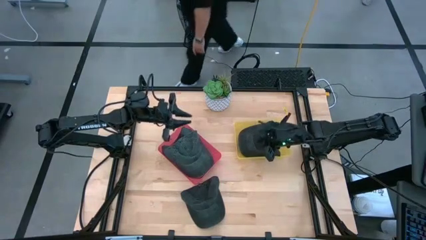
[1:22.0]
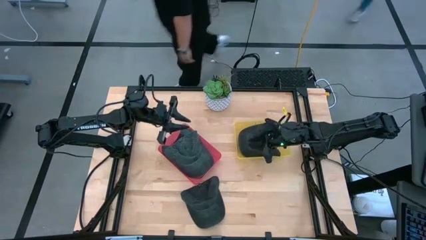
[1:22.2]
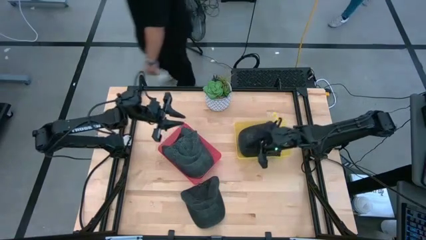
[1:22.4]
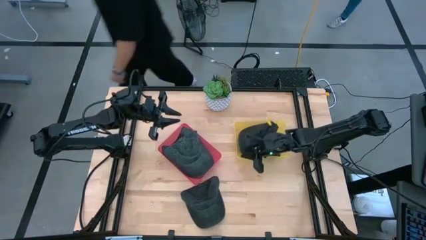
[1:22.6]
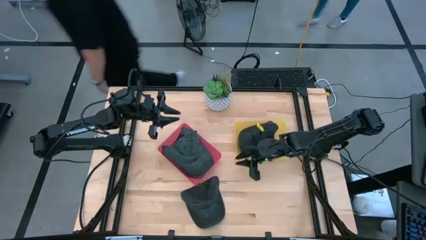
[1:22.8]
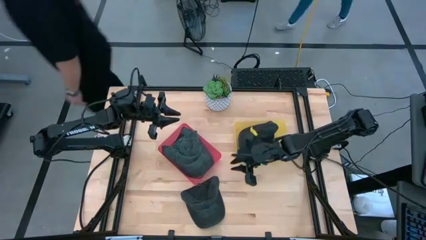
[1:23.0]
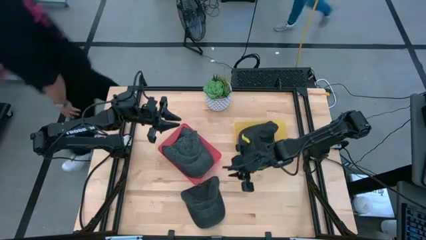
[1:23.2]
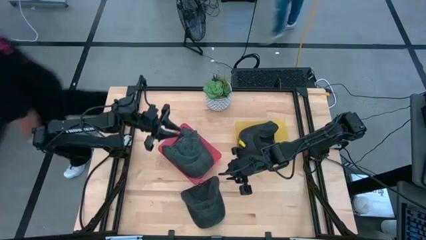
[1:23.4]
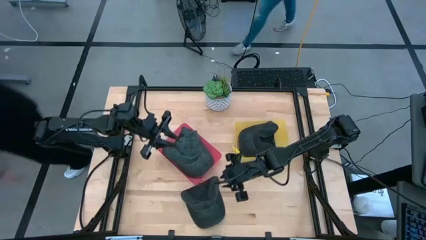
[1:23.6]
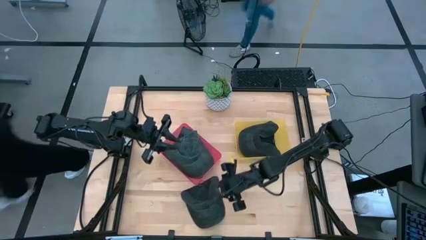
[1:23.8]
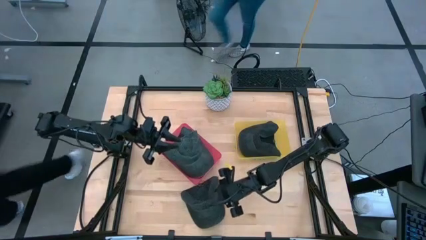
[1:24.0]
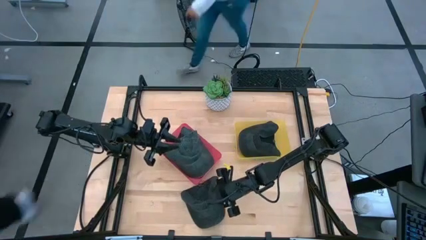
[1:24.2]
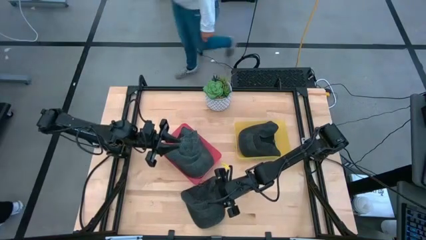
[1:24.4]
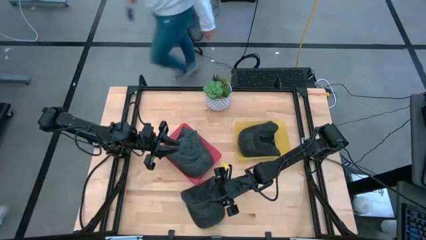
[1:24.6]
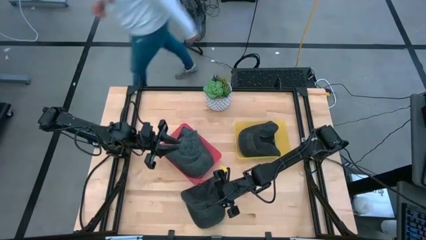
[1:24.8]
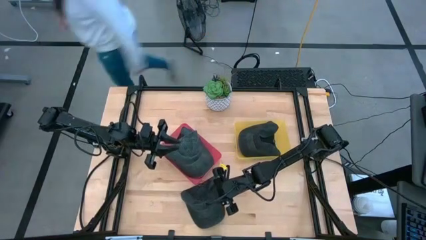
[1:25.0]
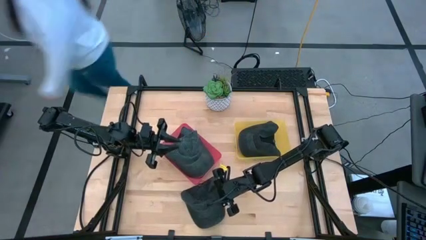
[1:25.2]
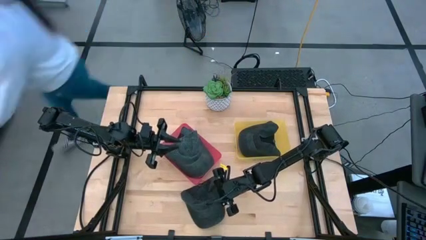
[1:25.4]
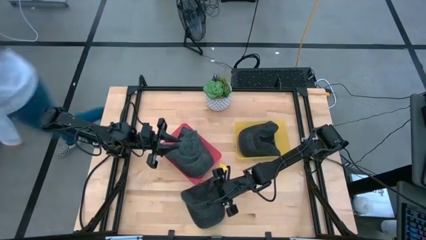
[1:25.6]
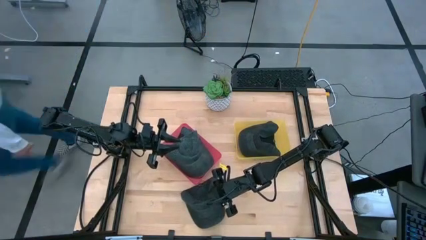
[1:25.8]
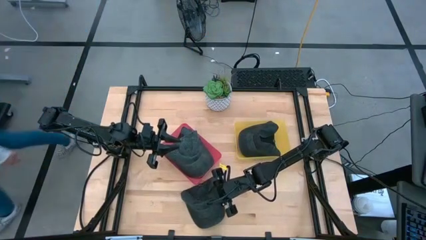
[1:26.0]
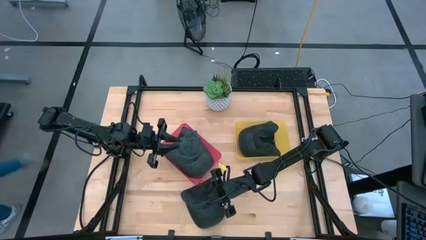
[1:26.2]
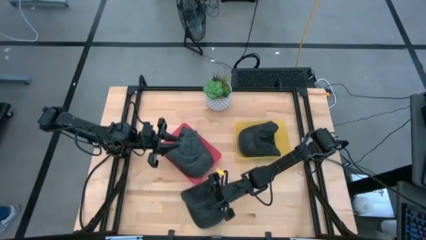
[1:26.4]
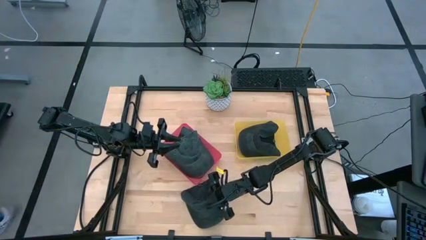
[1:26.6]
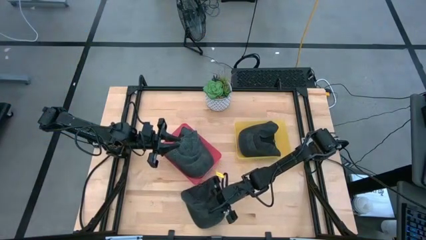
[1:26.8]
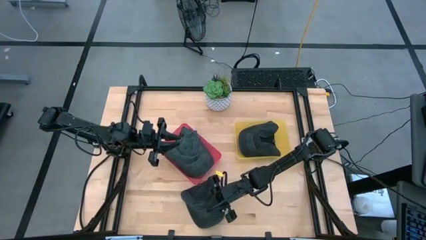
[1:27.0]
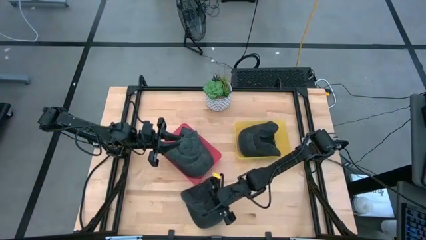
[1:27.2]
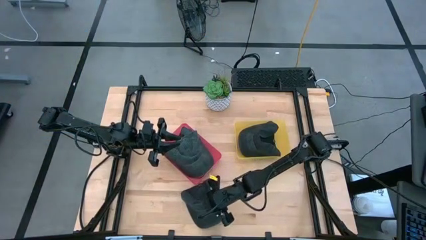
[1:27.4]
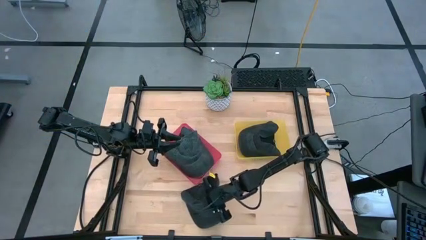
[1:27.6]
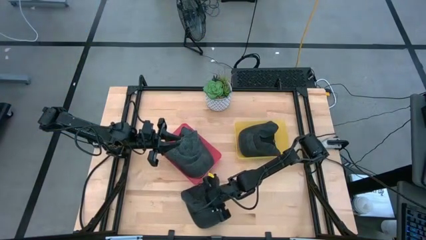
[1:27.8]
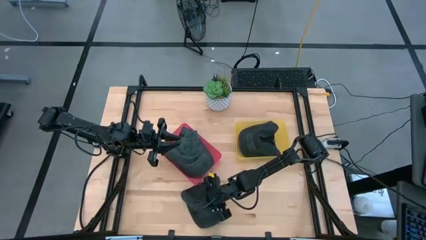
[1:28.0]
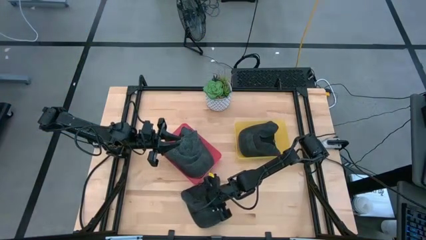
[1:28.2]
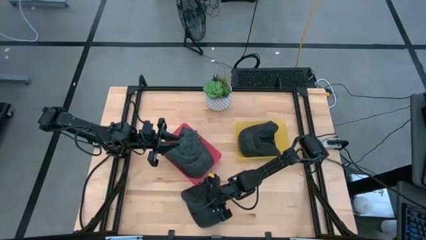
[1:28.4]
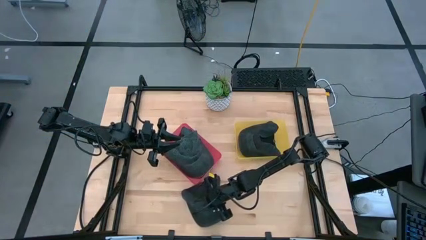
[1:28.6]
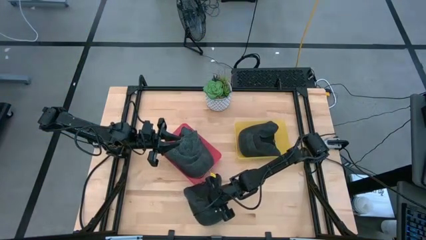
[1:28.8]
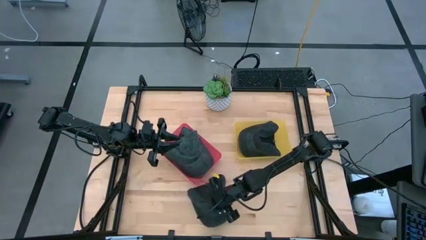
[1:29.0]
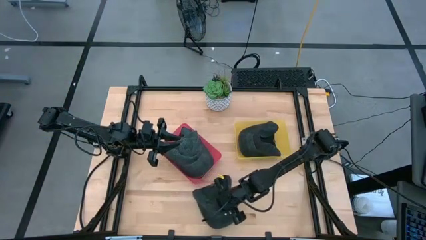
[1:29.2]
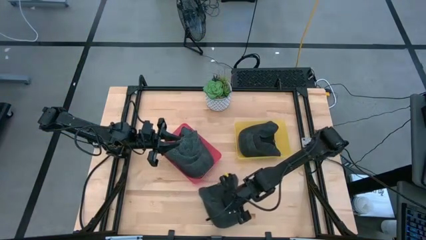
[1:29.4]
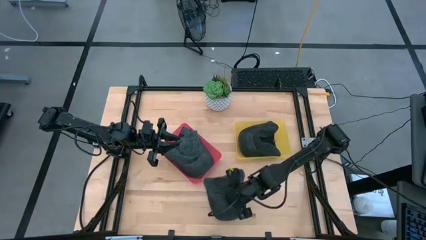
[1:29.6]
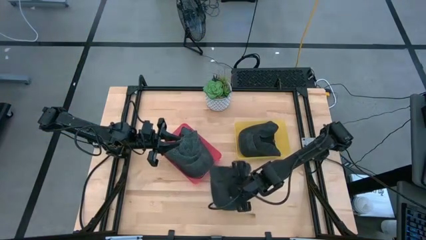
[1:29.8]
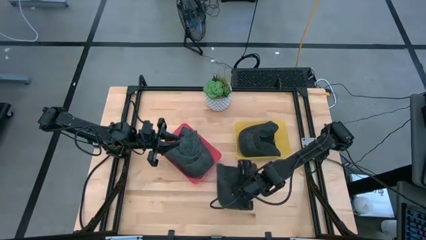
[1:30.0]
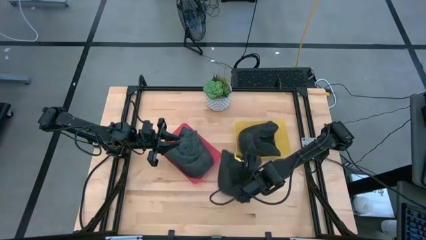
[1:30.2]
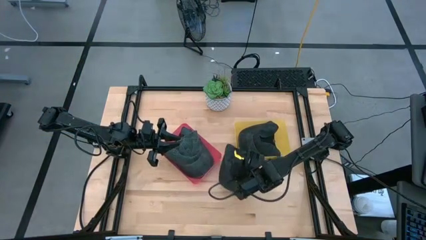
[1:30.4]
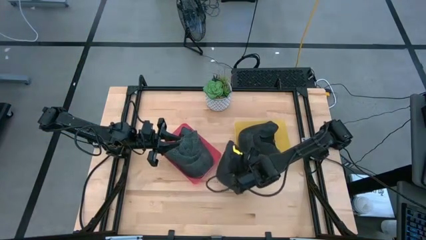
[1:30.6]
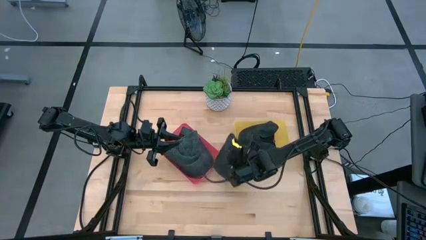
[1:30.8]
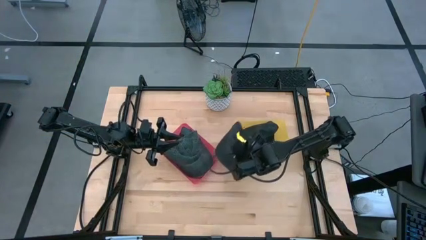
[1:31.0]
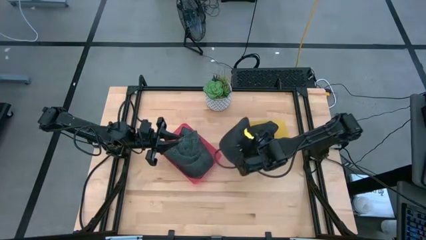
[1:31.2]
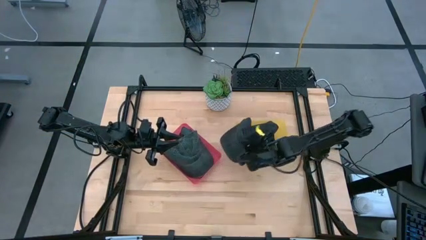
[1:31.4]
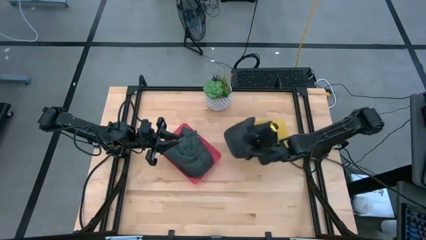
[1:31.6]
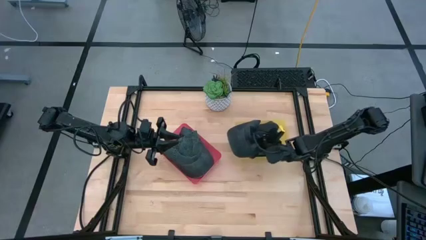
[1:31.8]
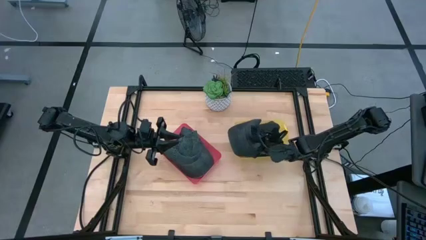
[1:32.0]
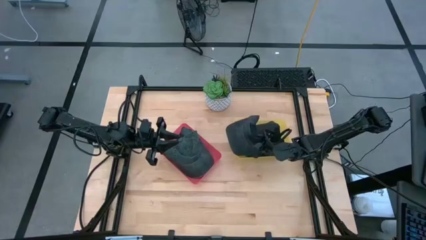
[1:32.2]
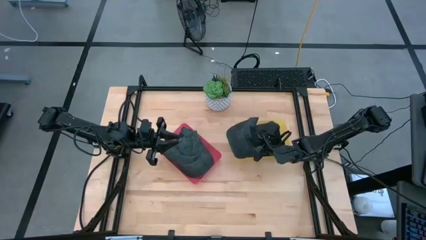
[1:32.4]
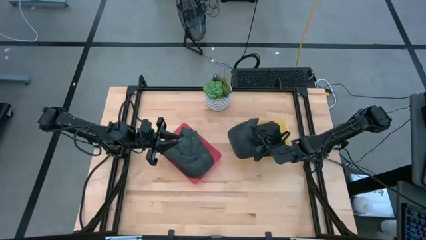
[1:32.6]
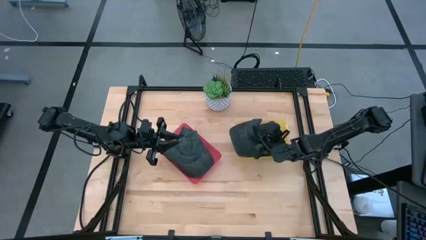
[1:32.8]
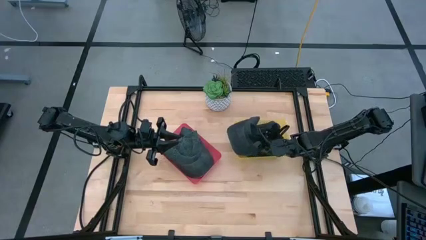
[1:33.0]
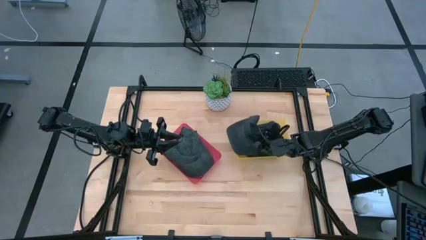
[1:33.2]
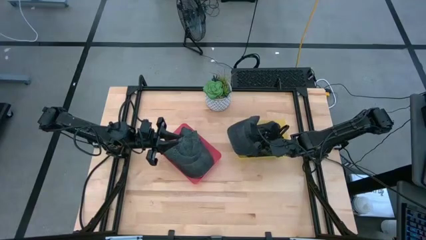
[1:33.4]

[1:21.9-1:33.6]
Task: Pick & Place hat
Put the black cap into the yellow bin

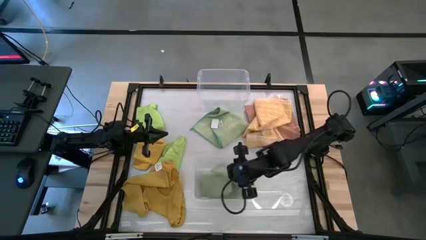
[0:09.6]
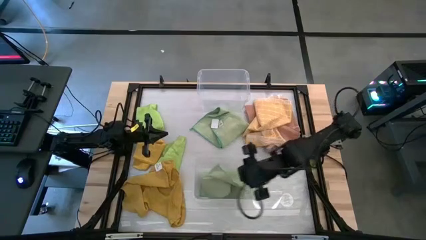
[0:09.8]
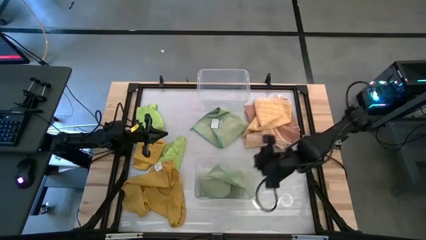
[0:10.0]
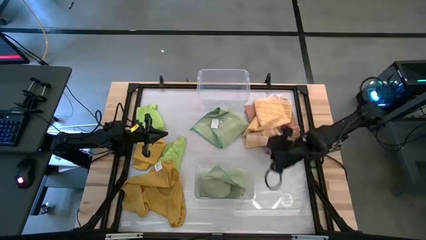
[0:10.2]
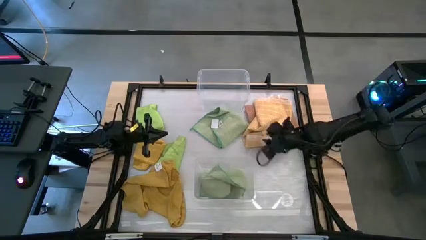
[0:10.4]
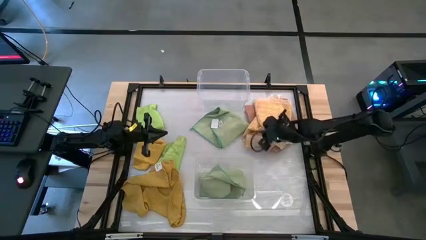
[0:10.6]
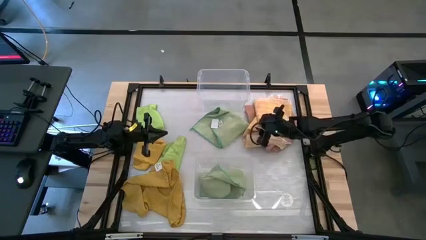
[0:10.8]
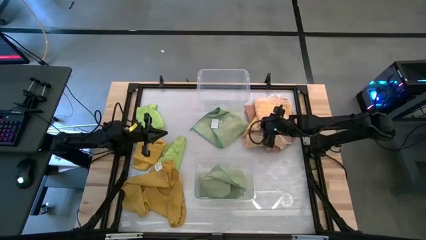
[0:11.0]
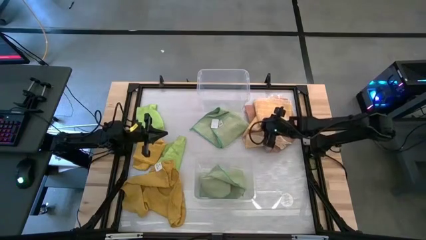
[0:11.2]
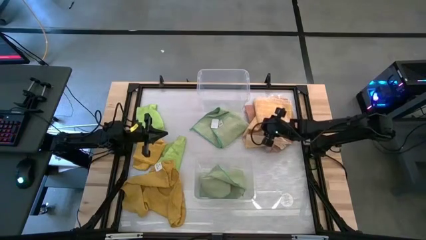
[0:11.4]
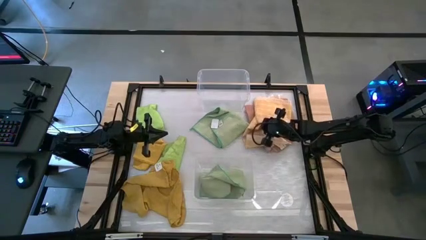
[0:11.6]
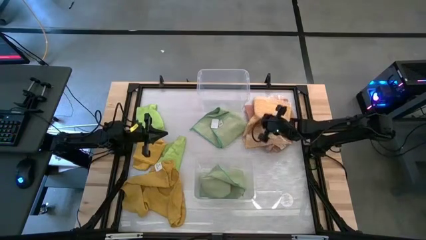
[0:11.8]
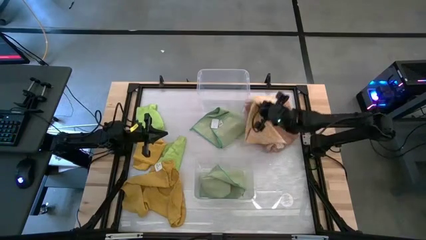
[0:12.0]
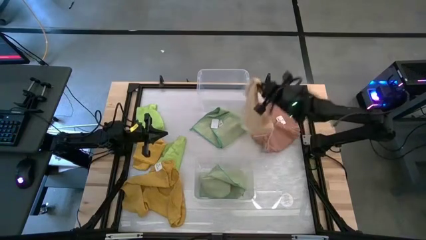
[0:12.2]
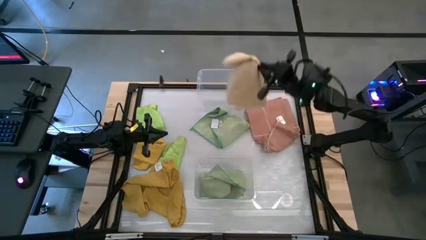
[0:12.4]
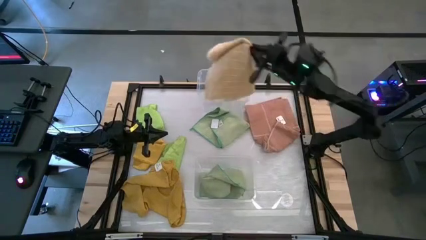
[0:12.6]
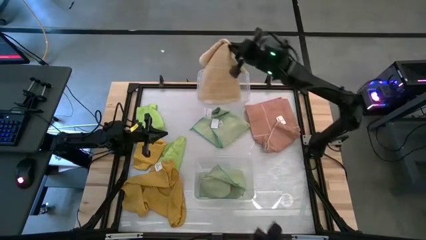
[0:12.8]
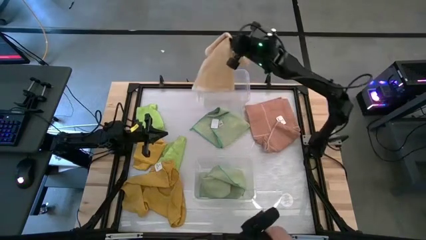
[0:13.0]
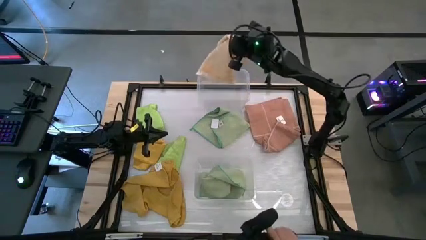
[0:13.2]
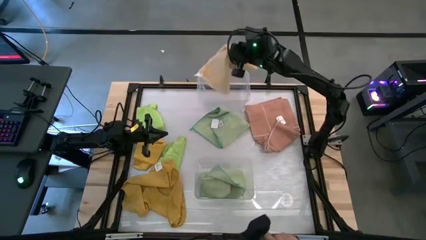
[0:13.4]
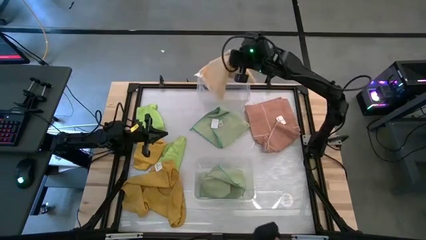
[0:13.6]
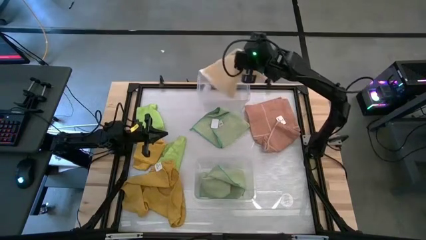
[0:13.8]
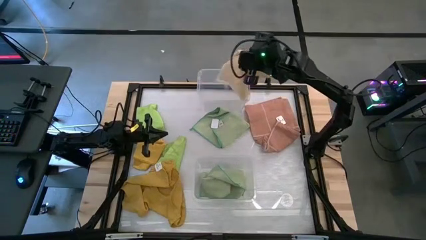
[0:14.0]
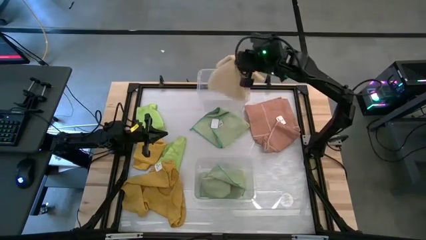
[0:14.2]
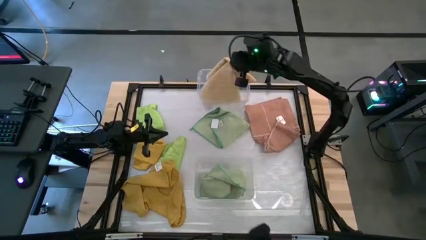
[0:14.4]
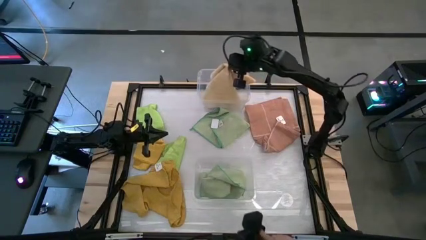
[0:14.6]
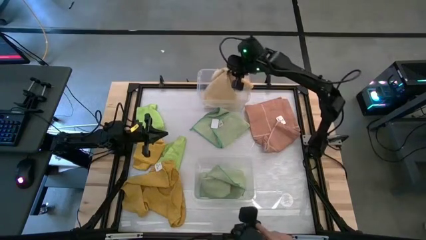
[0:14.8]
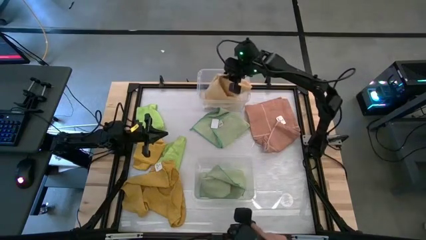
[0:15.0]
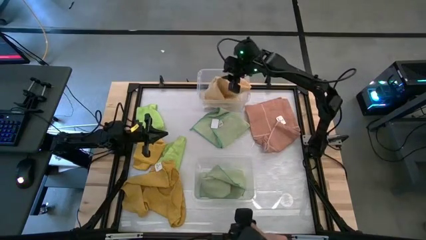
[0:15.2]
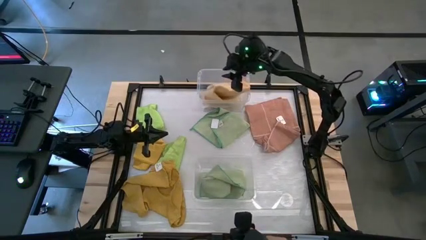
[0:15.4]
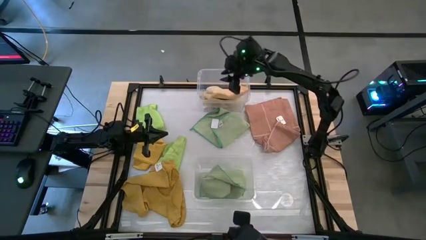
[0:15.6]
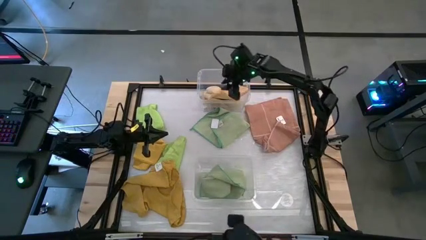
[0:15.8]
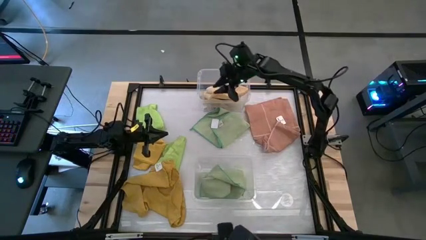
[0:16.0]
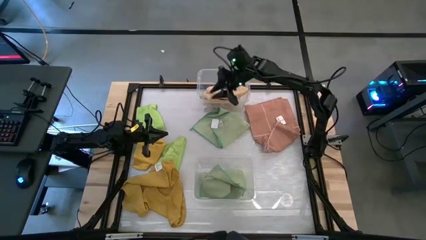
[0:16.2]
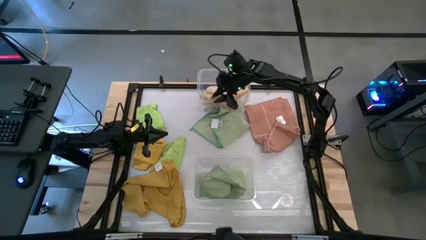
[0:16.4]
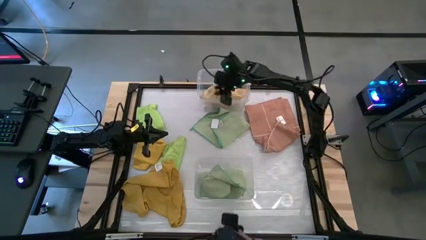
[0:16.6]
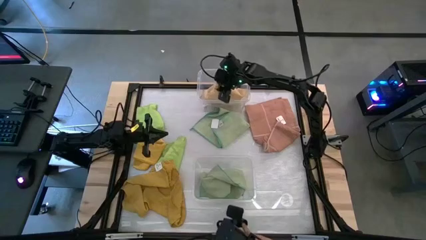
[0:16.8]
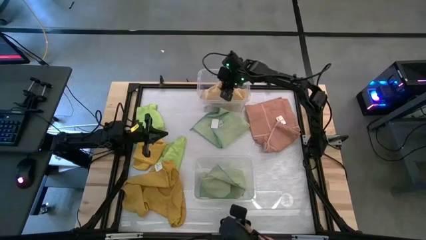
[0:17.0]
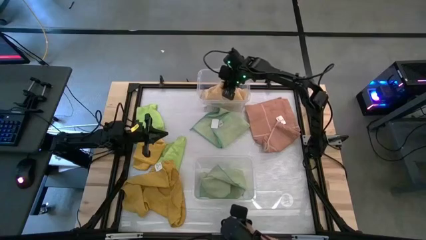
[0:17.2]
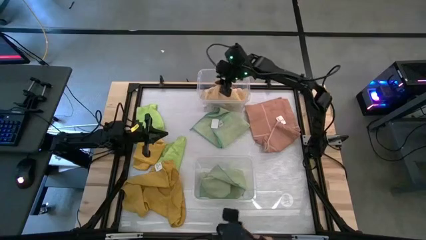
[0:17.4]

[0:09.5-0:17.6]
Task: Sort towels by color in basket
Put the orange towel into the top transparent bin
